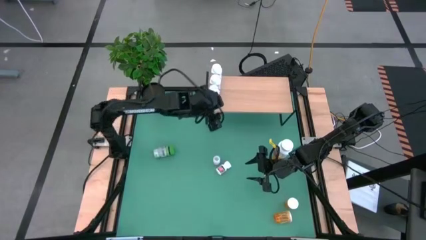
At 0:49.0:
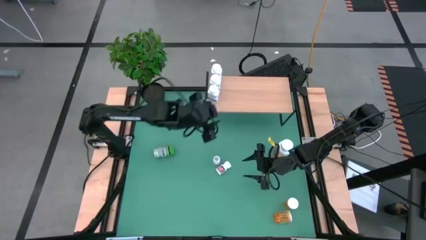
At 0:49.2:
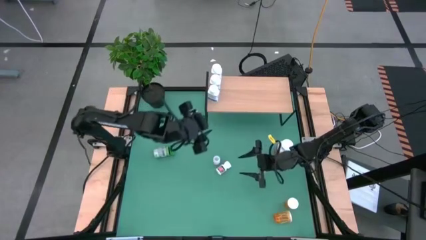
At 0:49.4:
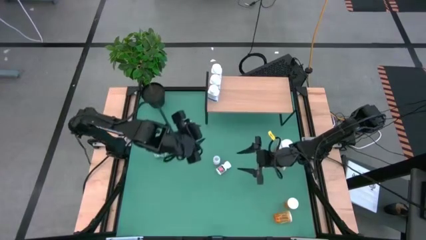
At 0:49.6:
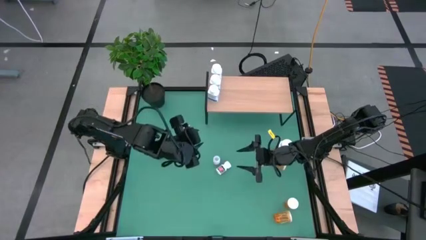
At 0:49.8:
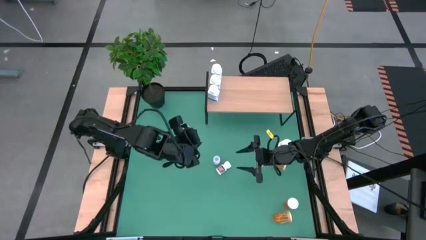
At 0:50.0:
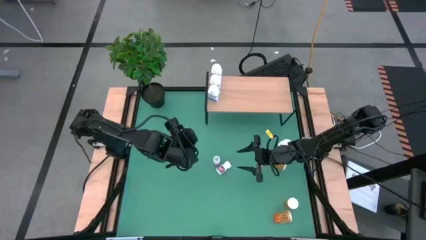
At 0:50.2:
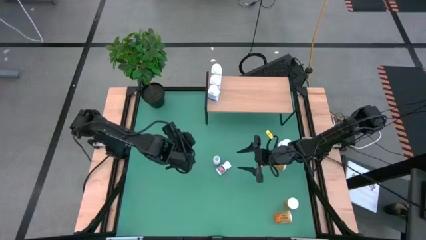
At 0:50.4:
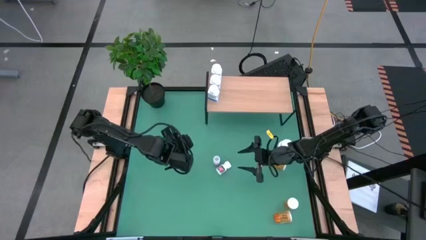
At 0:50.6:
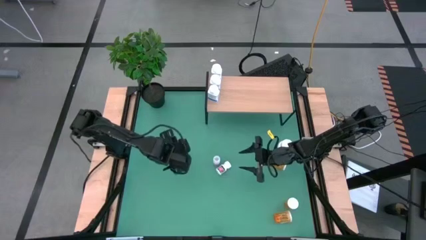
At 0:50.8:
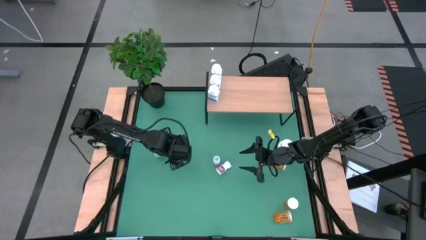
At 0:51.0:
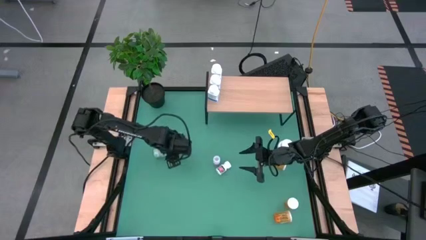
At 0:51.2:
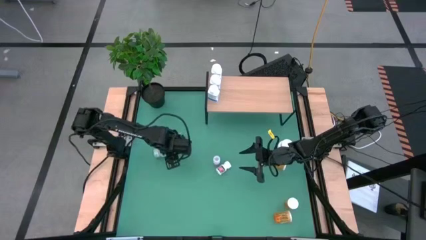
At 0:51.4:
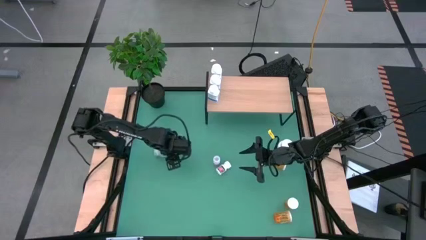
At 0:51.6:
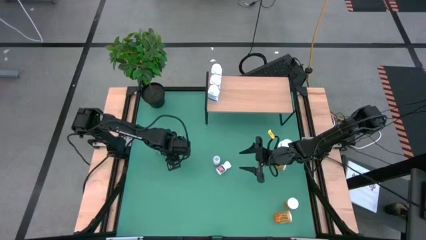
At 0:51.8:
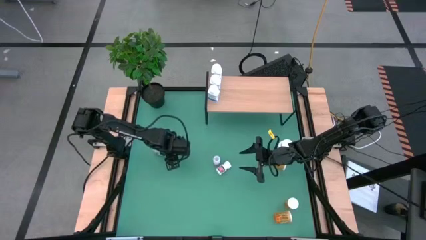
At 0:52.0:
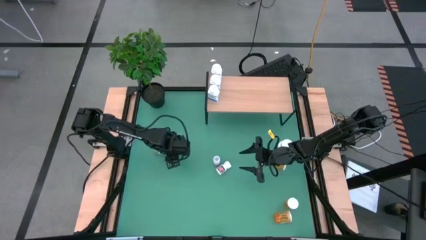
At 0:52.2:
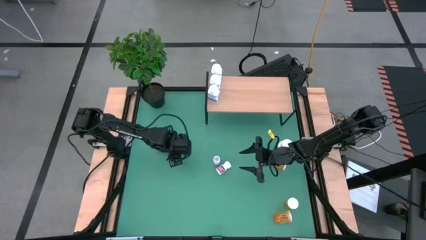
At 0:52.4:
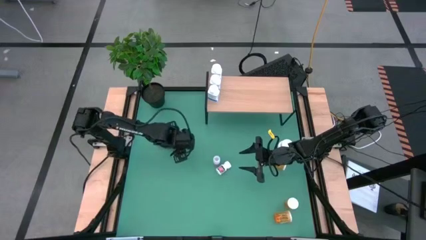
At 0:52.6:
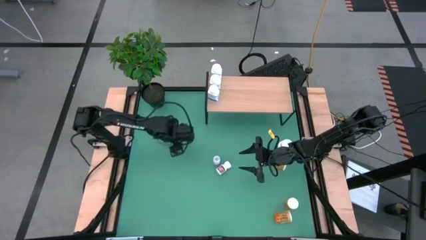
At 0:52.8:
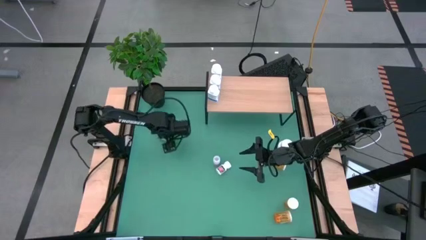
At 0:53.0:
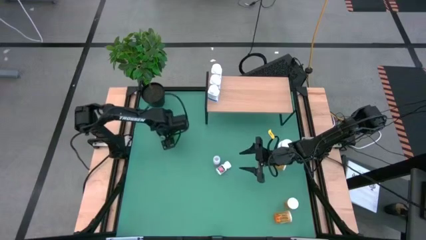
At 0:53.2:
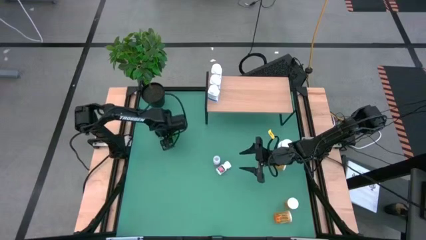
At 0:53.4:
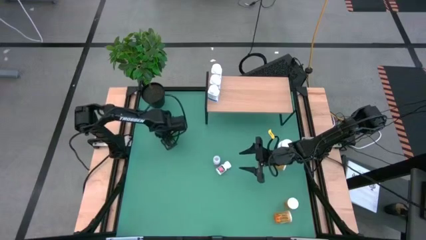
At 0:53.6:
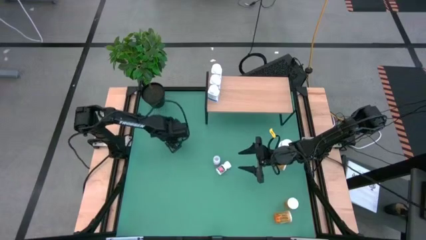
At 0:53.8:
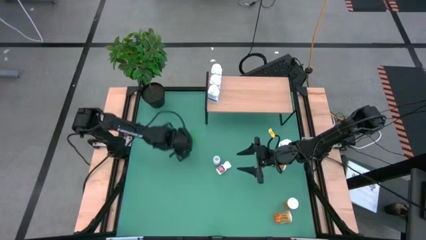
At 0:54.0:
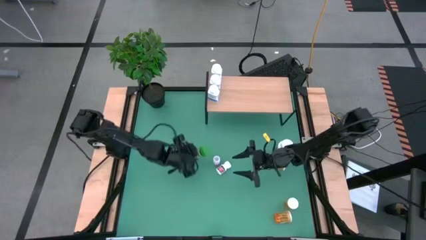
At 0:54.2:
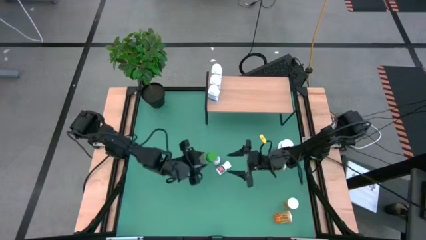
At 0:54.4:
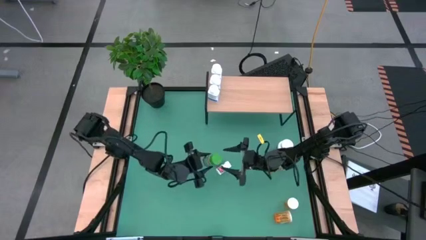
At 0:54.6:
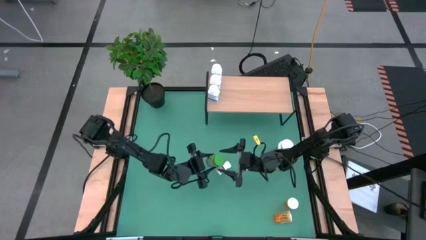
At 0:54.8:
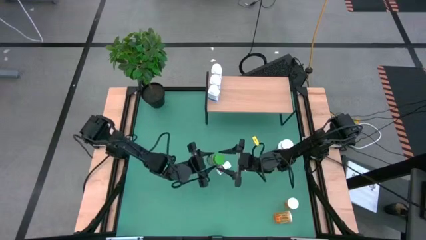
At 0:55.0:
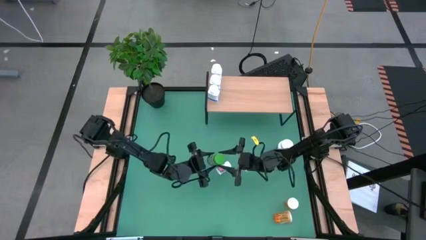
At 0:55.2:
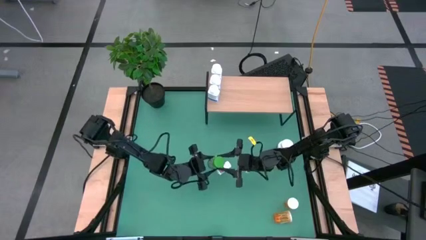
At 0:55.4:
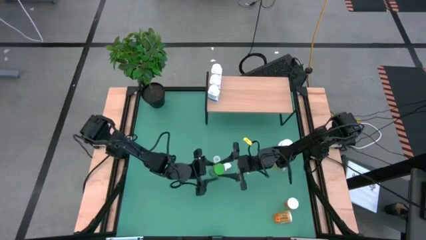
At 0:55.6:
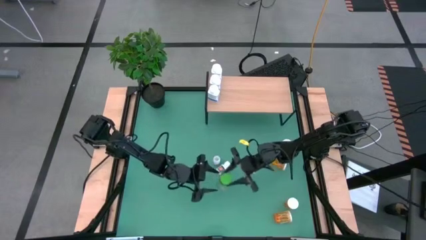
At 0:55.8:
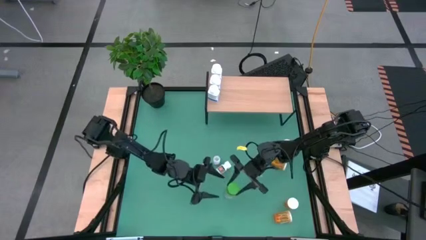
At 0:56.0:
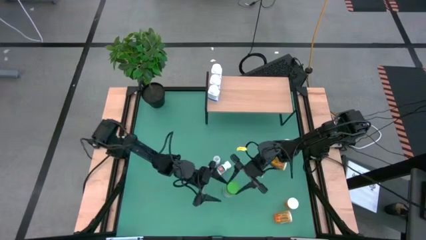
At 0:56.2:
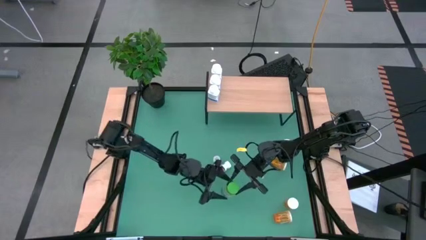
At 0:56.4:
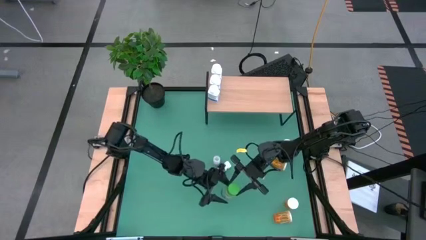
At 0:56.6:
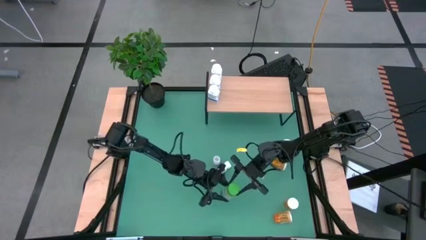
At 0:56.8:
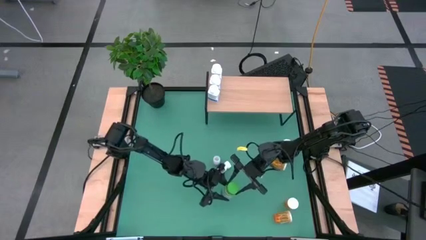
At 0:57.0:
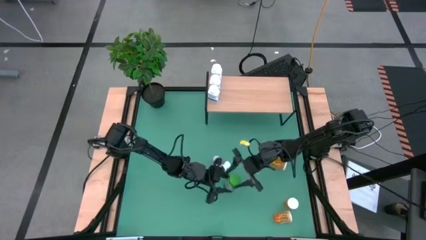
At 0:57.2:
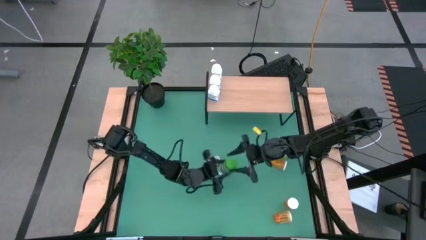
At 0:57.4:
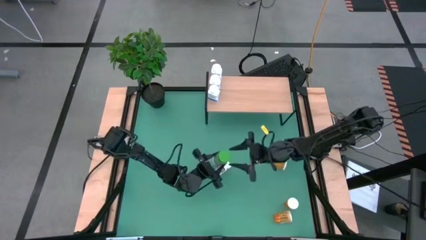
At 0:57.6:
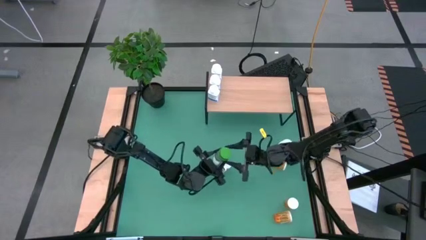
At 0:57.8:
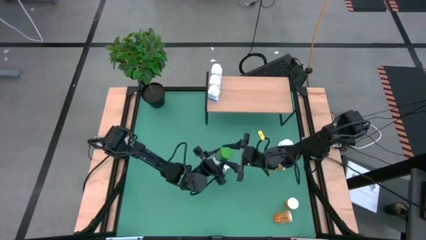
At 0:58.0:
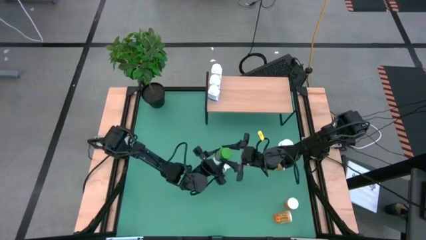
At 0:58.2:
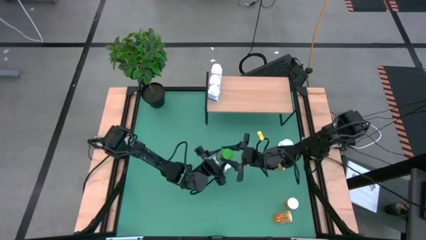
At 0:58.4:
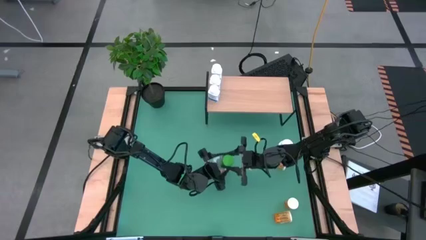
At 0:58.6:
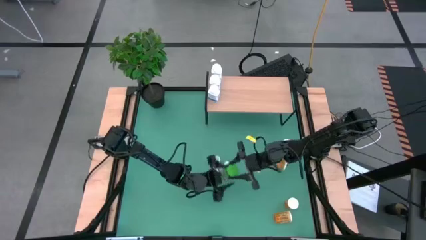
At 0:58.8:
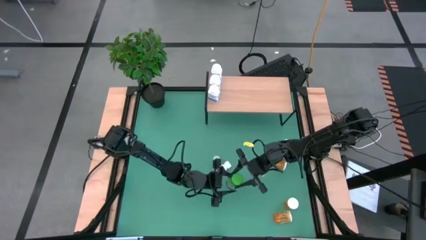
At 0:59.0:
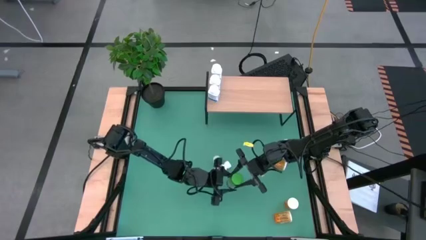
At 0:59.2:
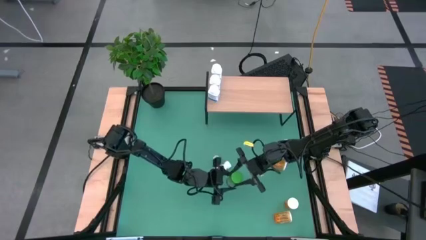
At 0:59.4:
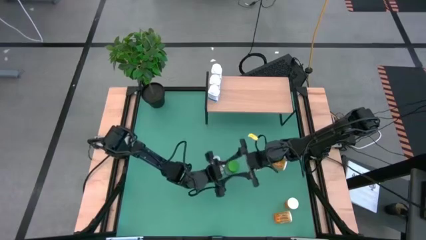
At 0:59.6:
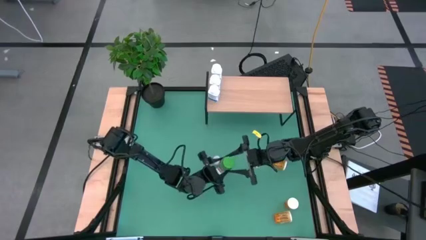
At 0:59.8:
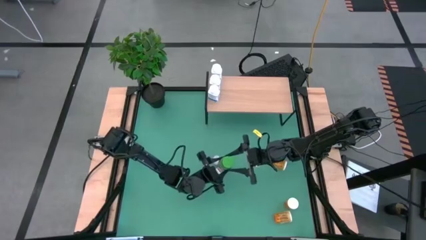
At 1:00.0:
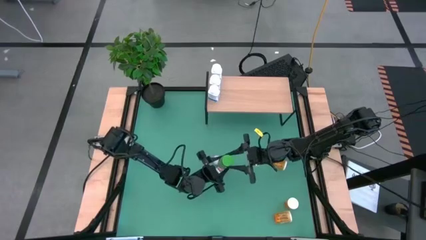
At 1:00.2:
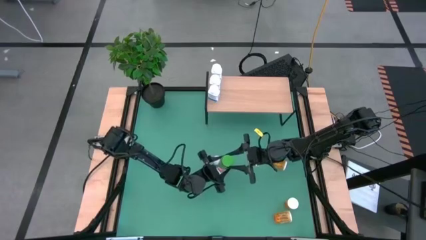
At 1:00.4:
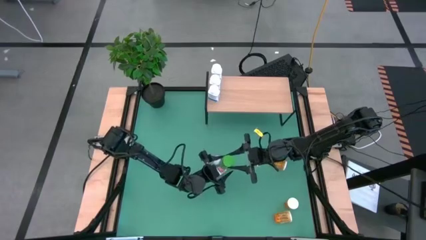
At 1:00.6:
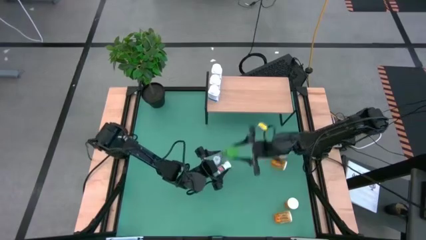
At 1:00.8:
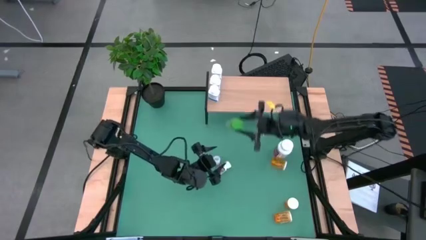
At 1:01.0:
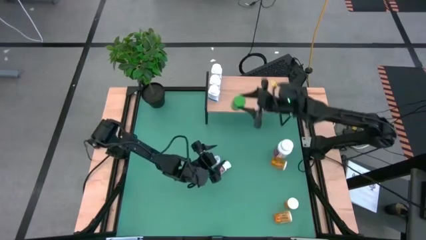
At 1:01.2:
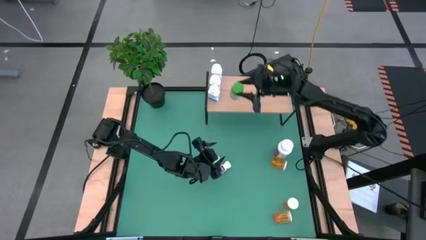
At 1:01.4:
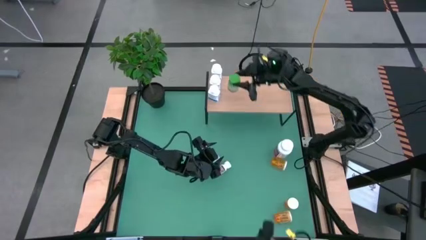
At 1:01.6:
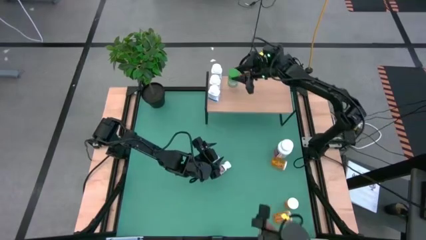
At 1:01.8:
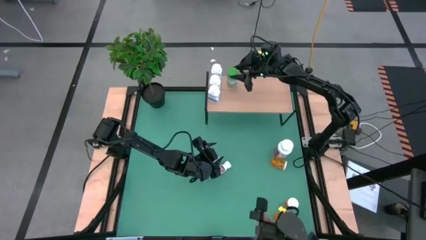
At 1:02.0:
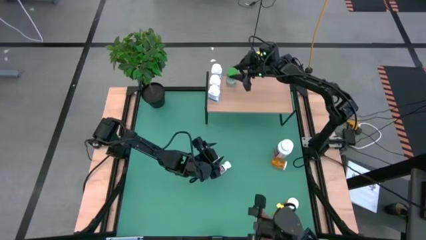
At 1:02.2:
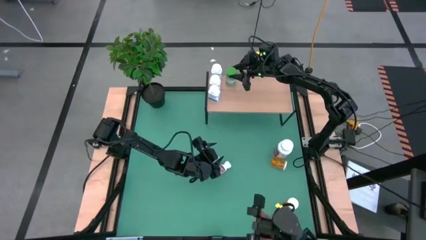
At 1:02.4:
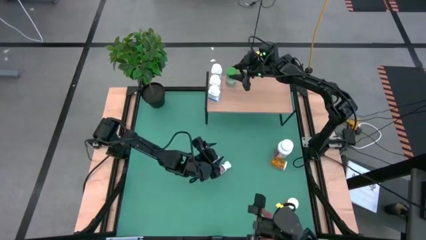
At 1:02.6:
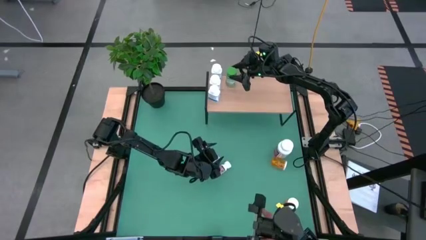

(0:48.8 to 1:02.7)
Task: Pick and place medicine bottles onto shelf by color
Put the green pill bottle on the shelf
